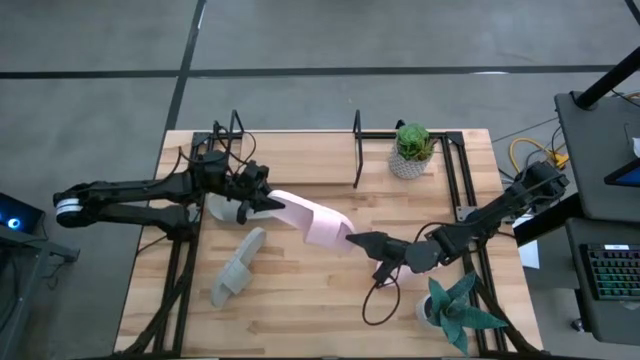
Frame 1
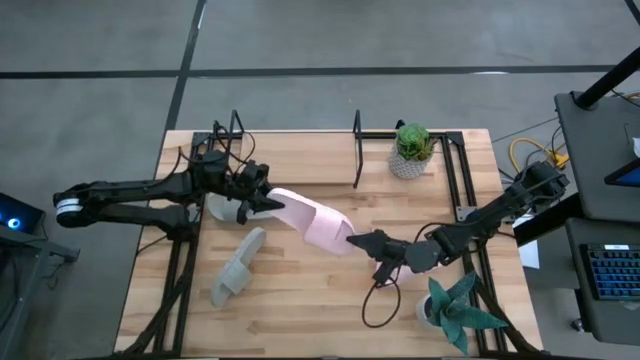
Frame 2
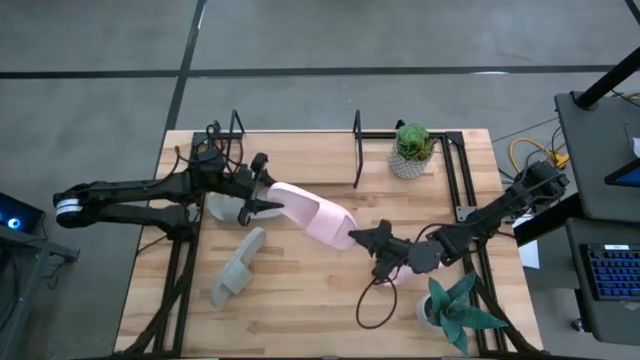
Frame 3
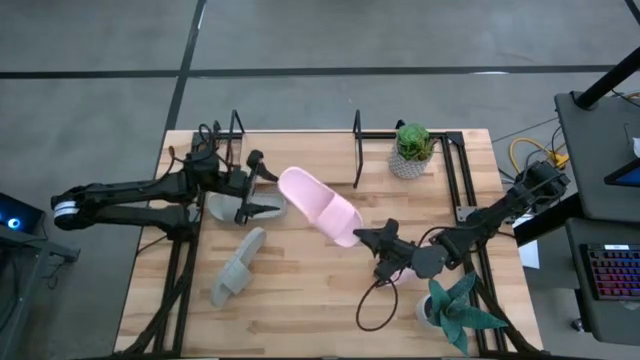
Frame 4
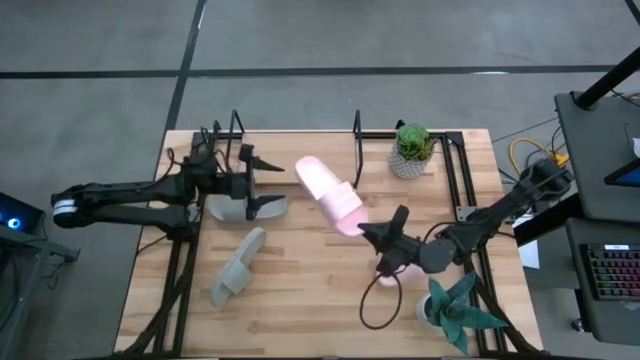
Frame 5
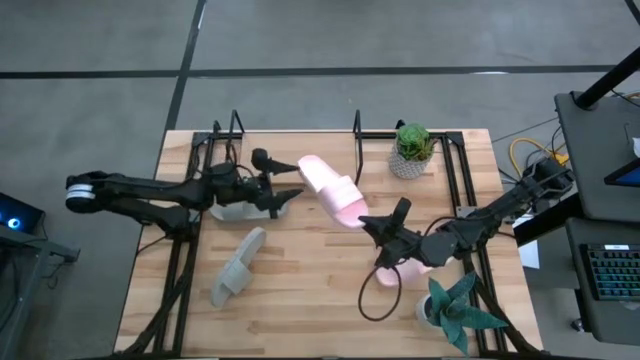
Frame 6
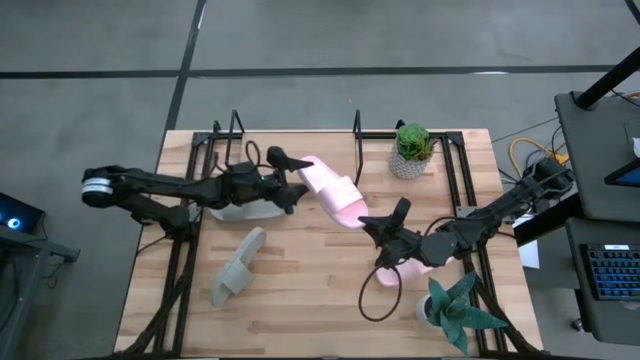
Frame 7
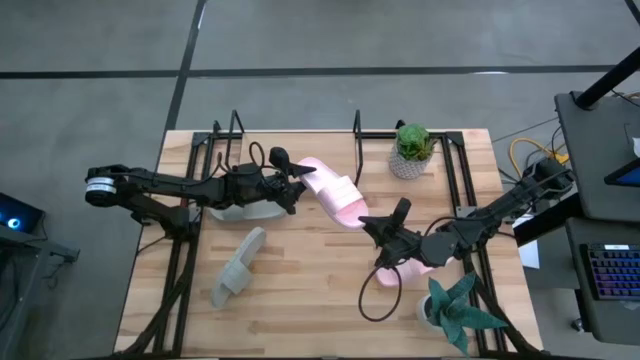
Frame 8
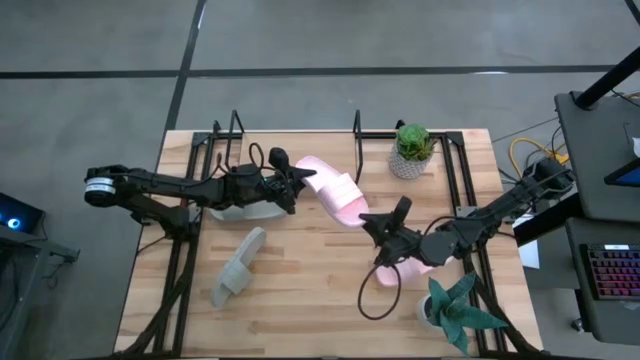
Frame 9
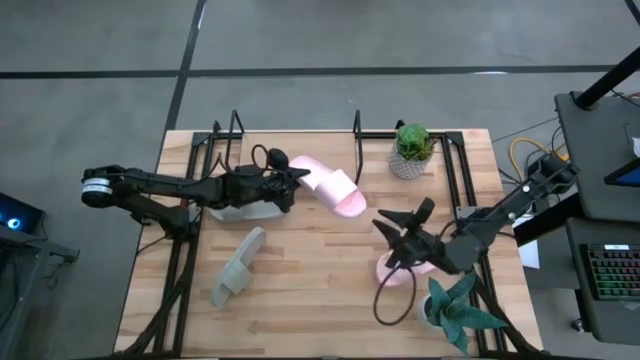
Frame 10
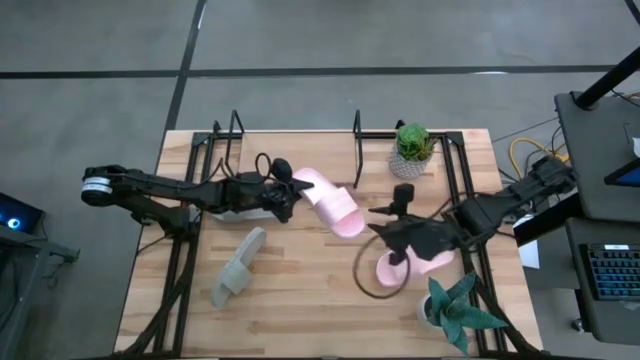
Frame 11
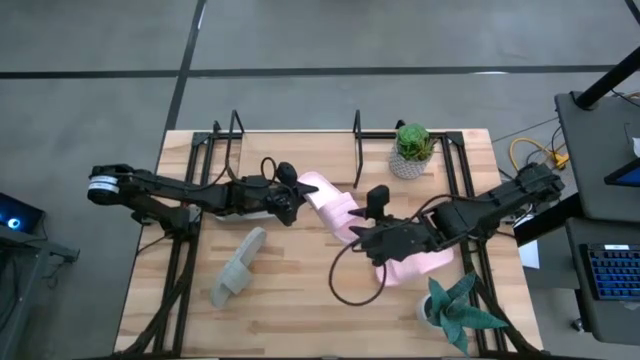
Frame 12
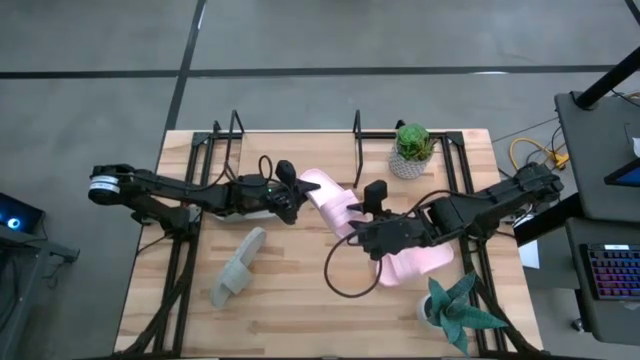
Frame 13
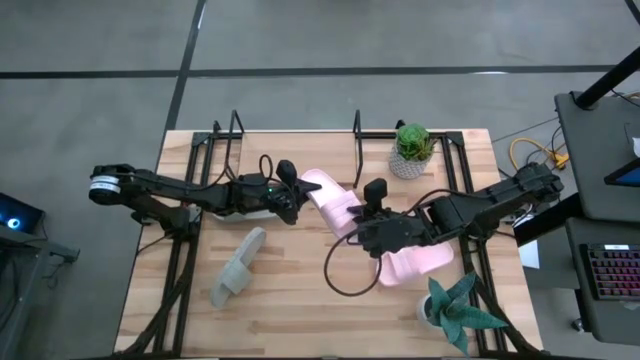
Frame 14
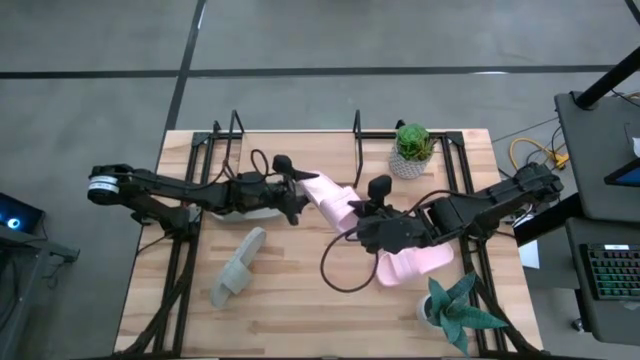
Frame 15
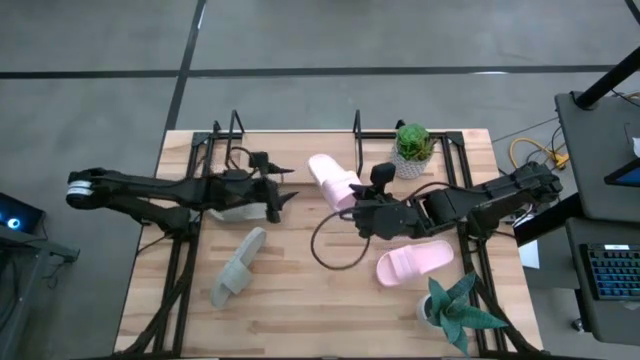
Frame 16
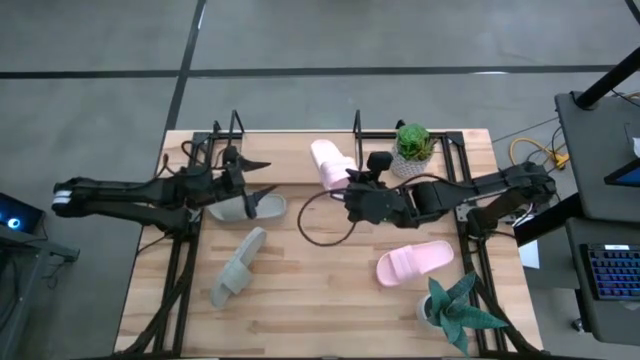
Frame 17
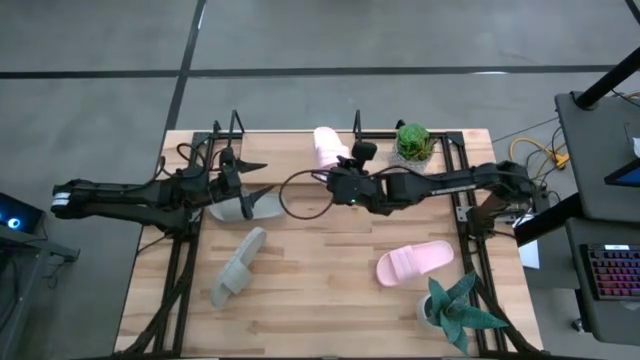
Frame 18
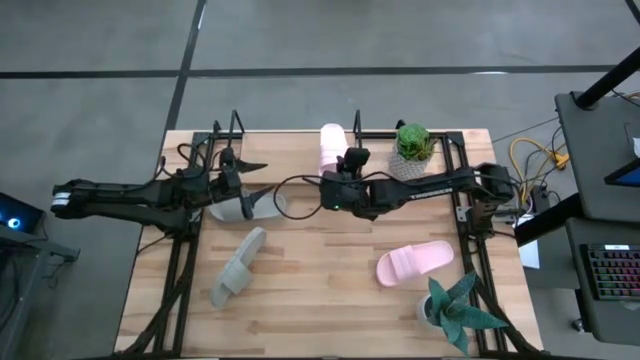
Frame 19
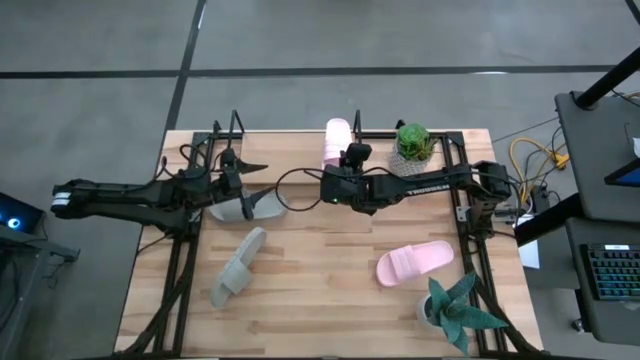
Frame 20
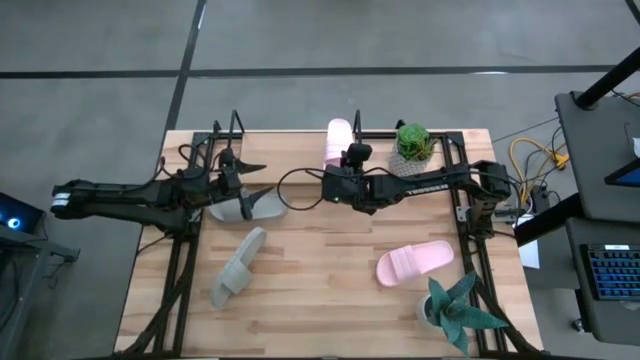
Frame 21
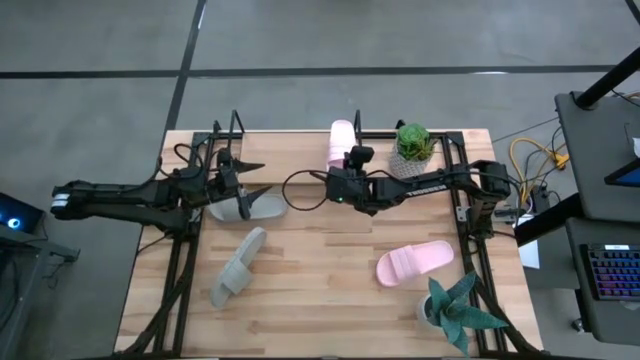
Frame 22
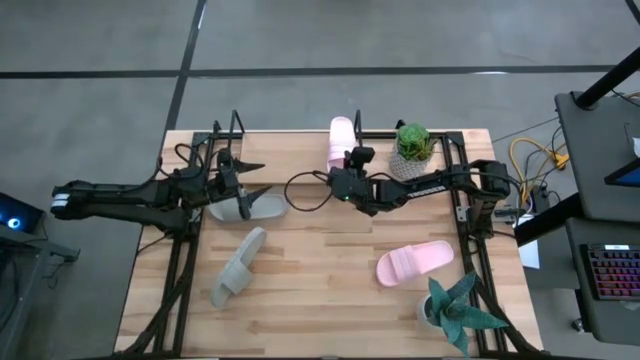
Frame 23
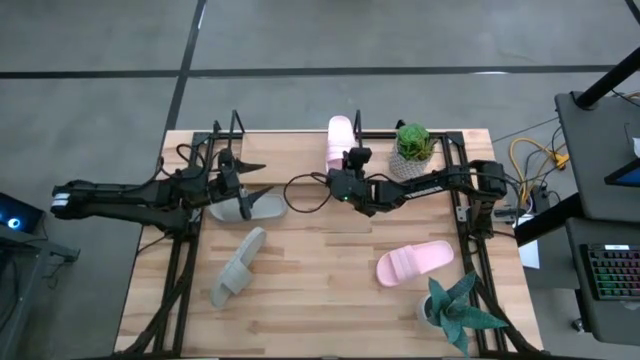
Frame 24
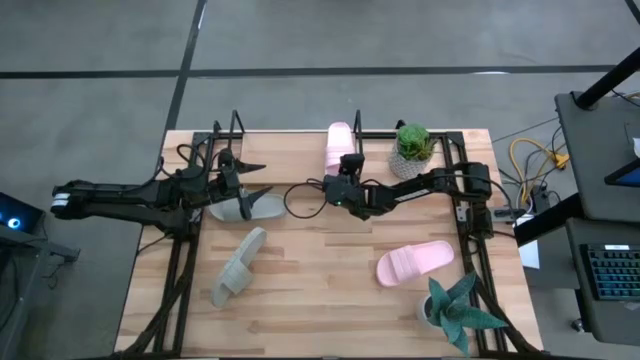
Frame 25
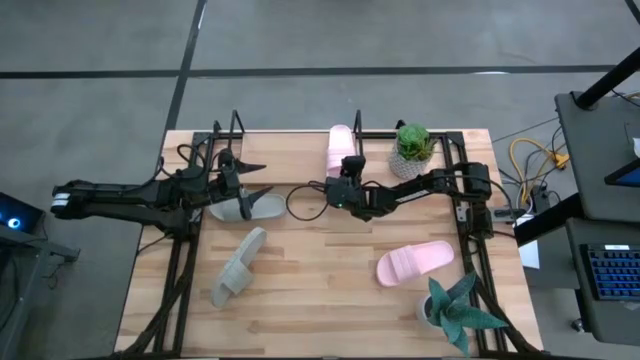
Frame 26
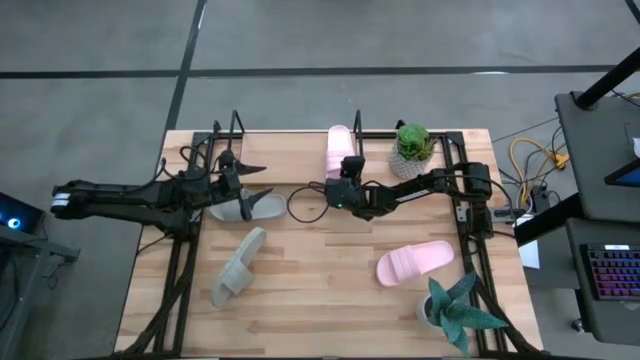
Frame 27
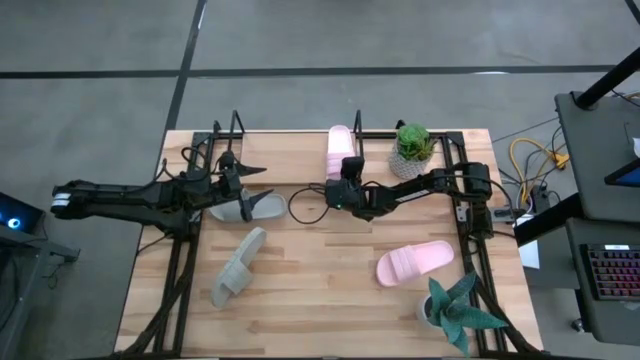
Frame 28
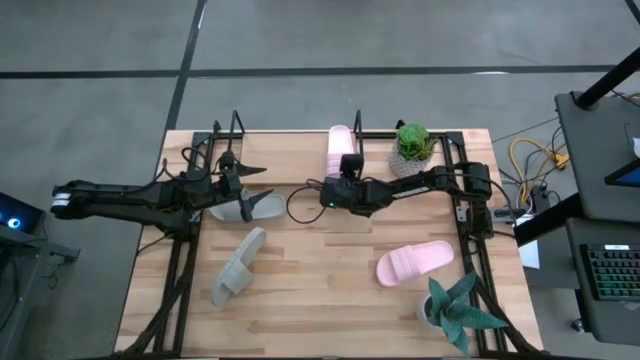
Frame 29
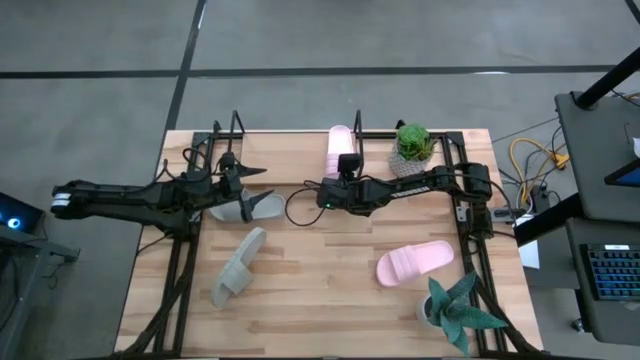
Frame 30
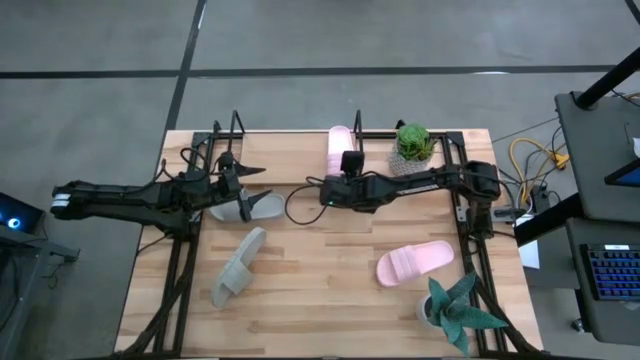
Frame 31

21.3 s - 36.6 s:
Task: Pick and place slides into the shelf
Put the top pink slide on the shelf

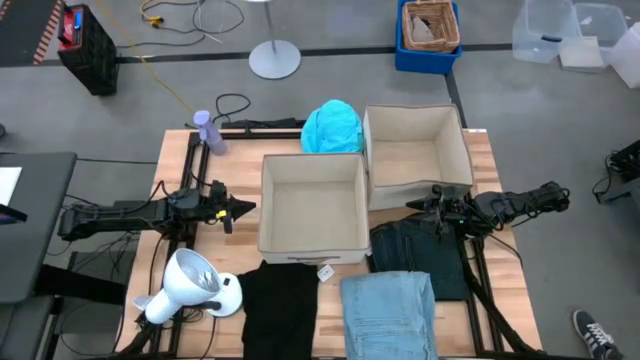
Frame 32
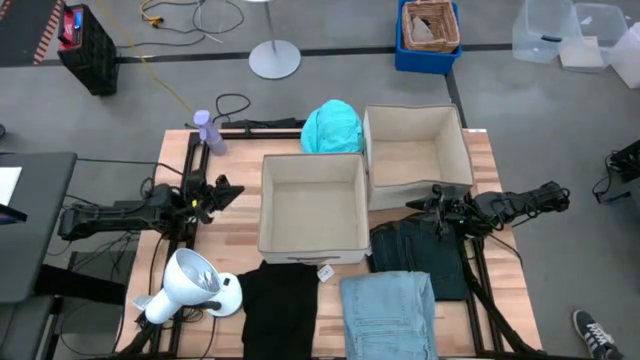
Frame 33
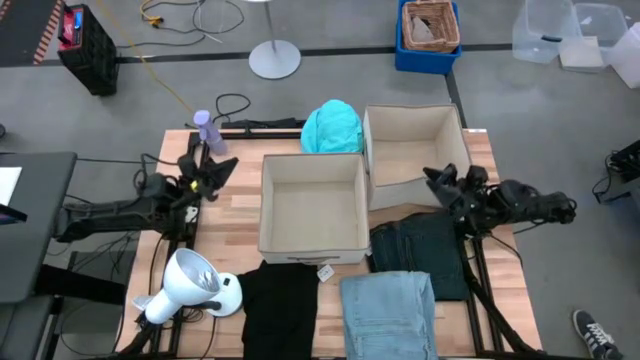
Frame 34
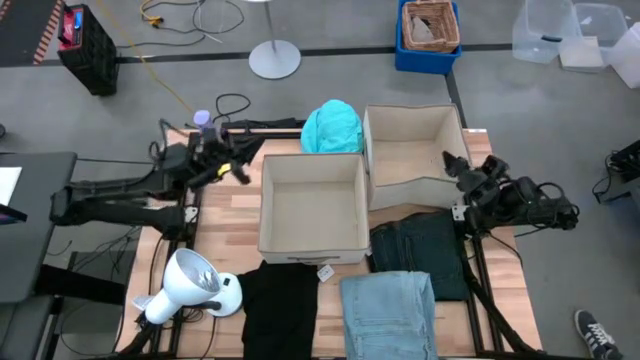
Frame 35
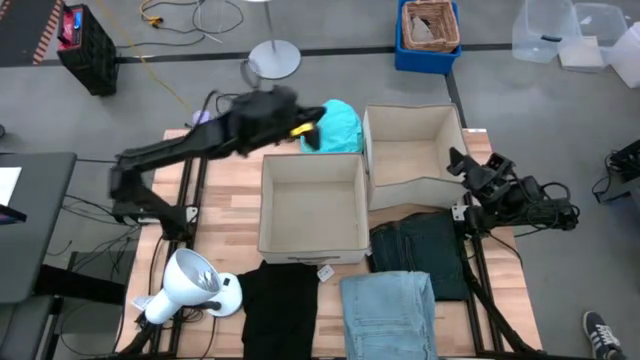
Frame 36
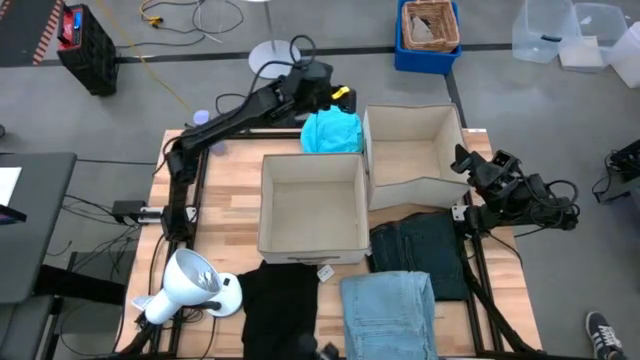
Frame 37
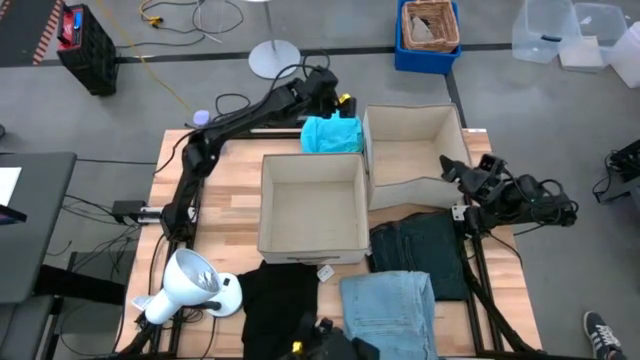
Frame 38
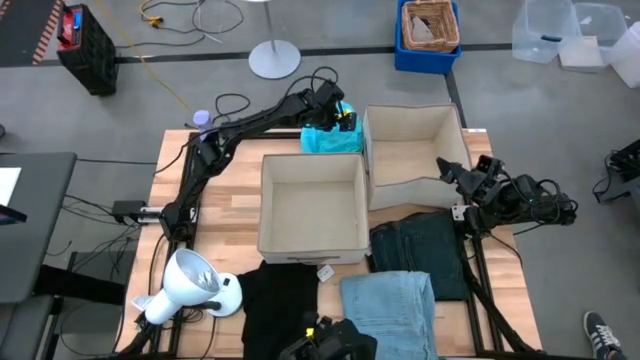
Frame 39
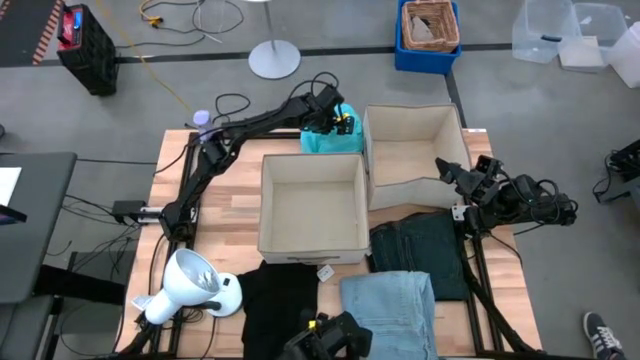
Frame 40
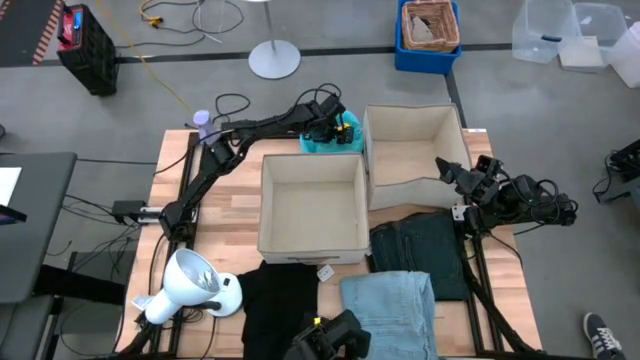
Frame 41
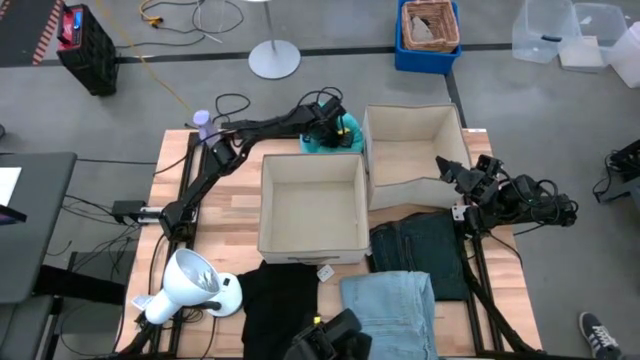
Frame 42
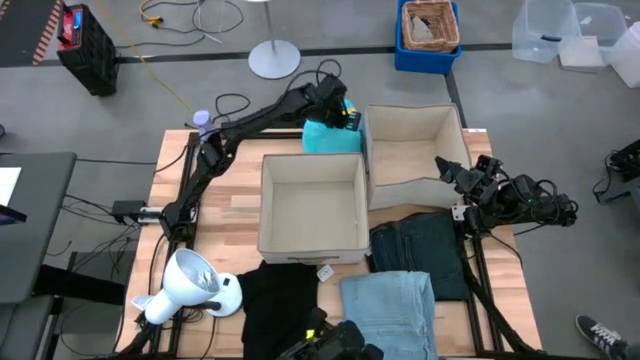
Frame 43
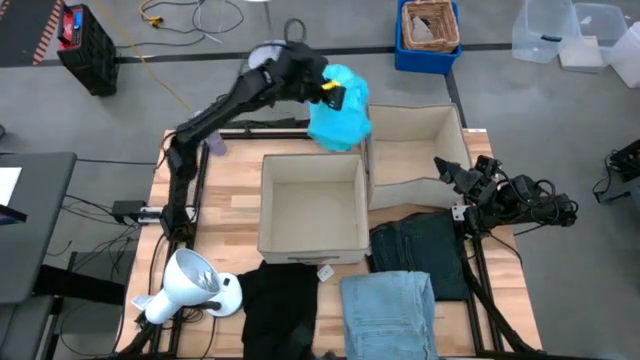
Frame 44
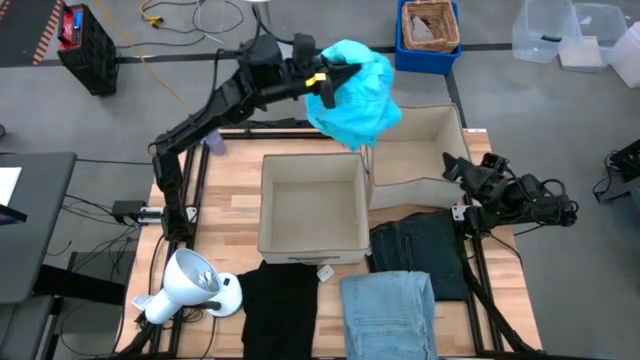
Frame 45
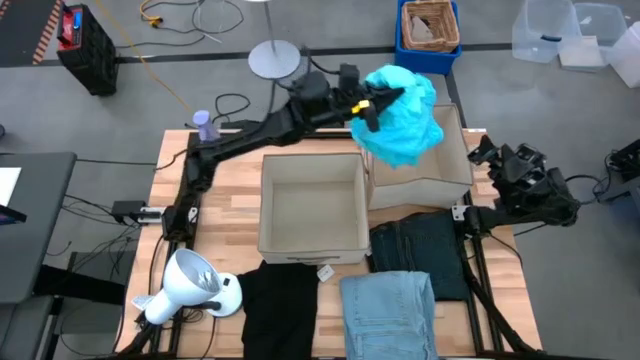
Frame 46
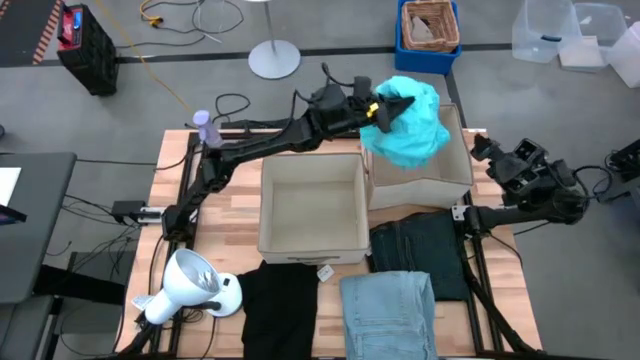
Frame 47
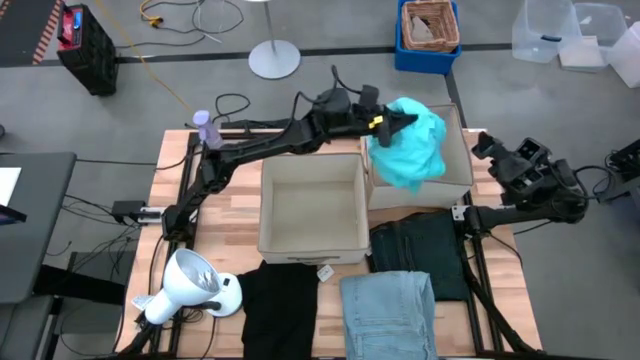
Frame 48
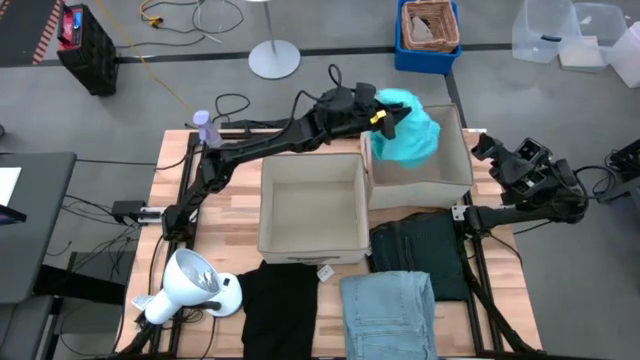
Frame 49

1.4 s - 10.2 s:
Task: Sort clothes
Put the blue shorts in the right brown bin
